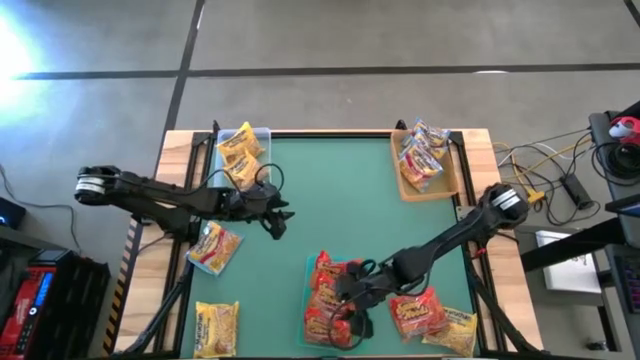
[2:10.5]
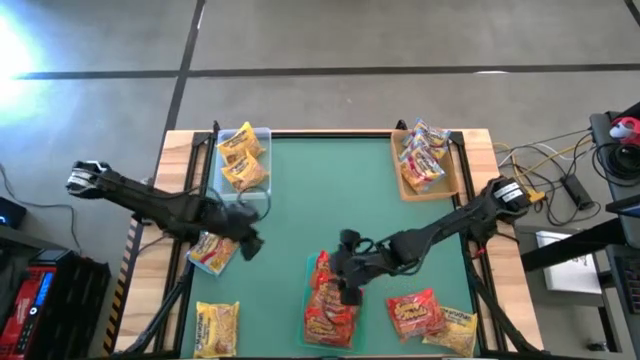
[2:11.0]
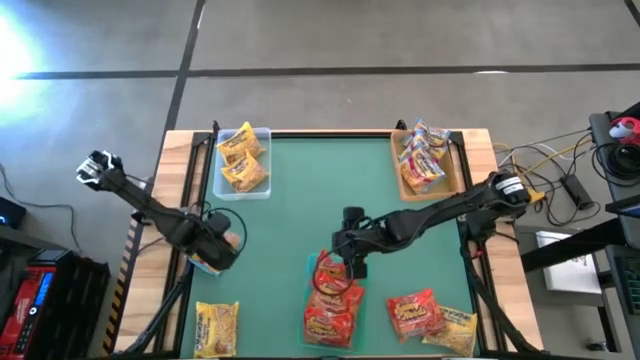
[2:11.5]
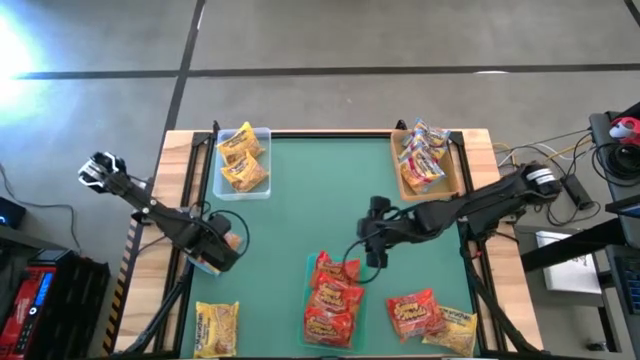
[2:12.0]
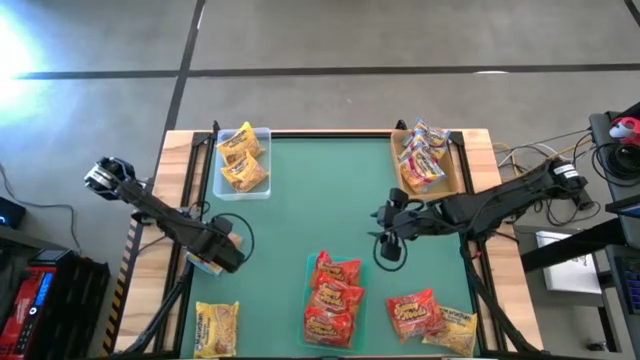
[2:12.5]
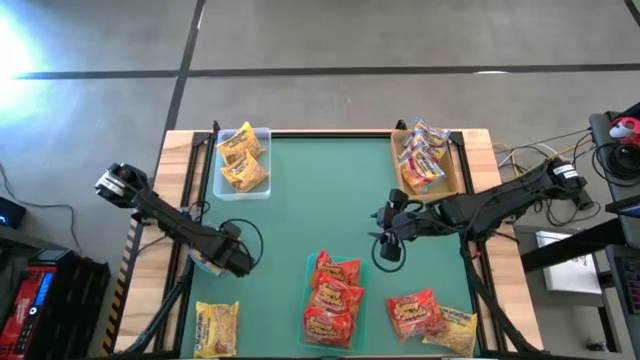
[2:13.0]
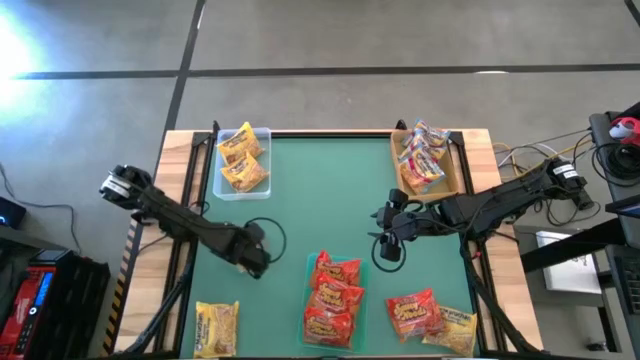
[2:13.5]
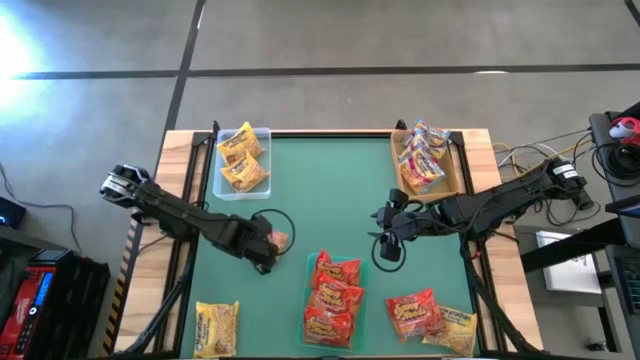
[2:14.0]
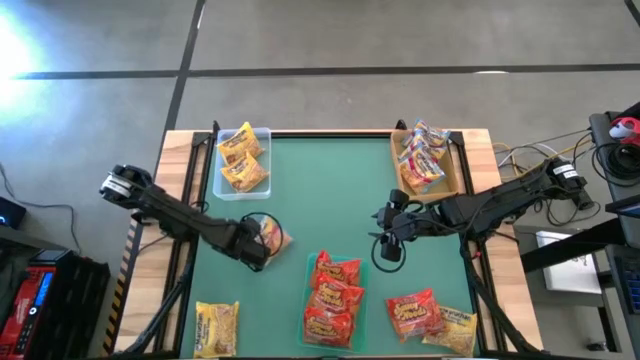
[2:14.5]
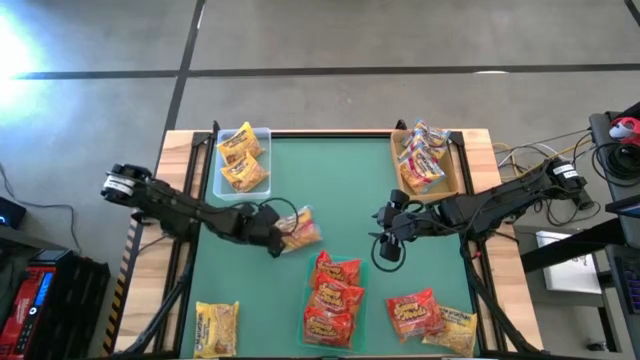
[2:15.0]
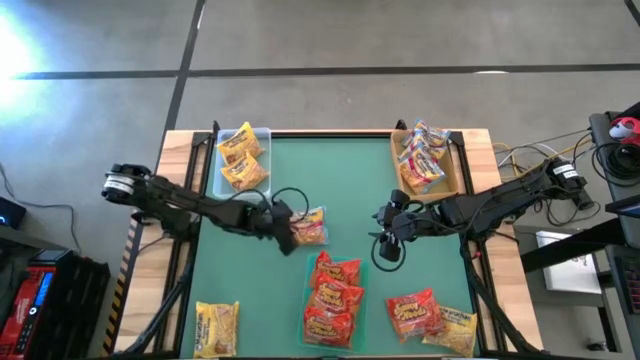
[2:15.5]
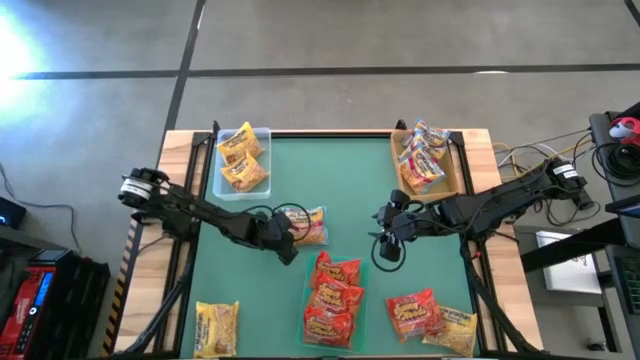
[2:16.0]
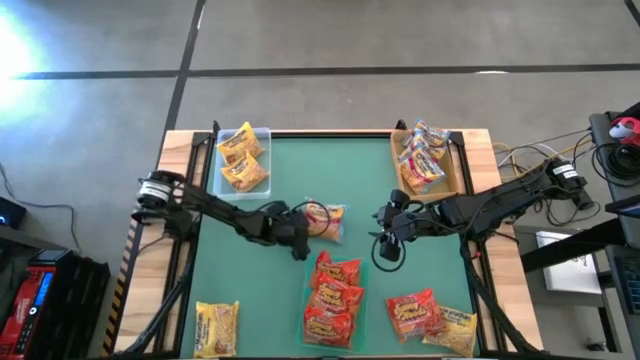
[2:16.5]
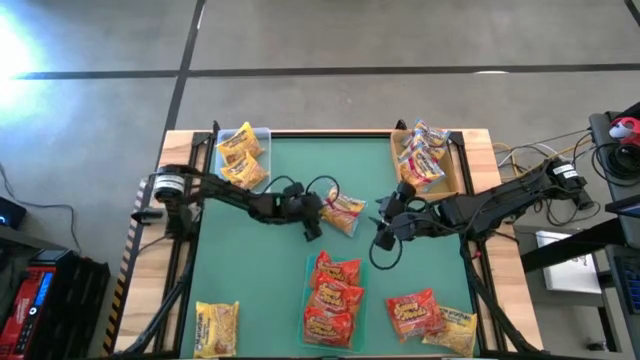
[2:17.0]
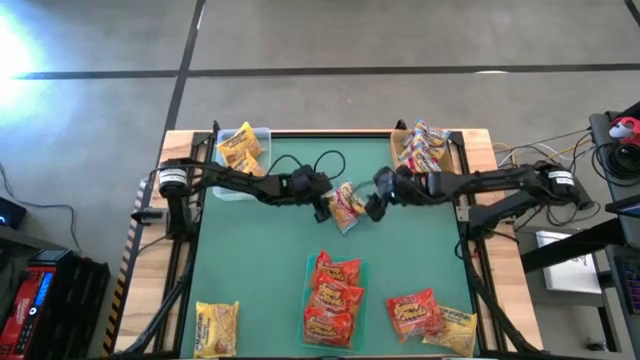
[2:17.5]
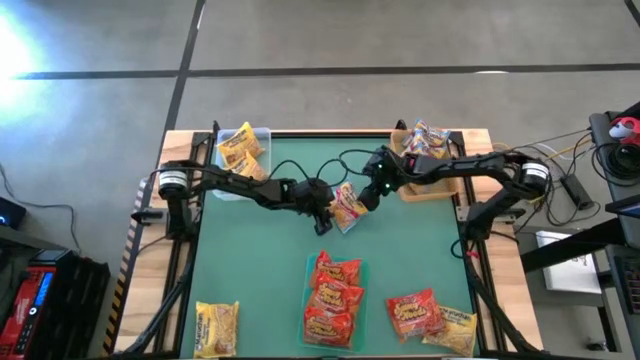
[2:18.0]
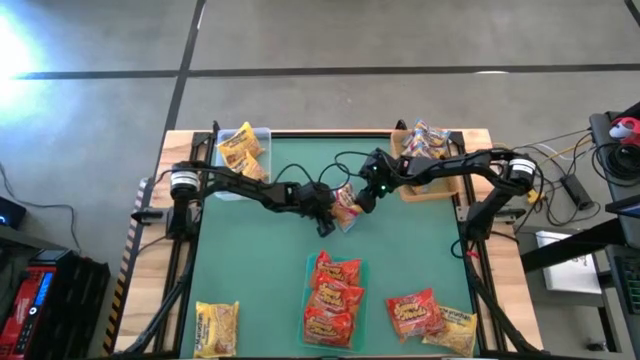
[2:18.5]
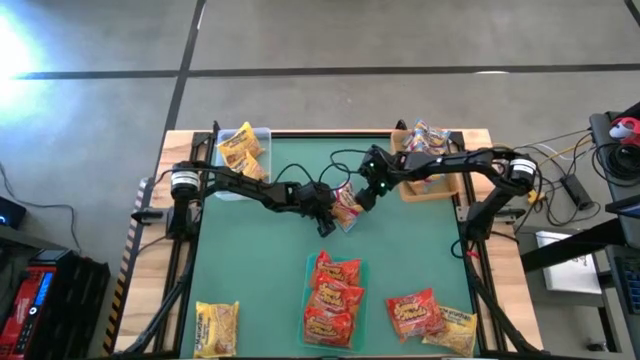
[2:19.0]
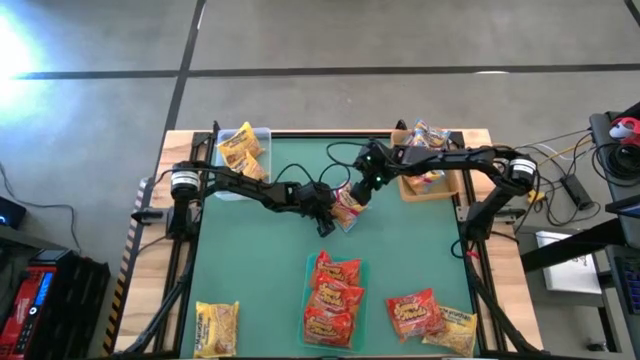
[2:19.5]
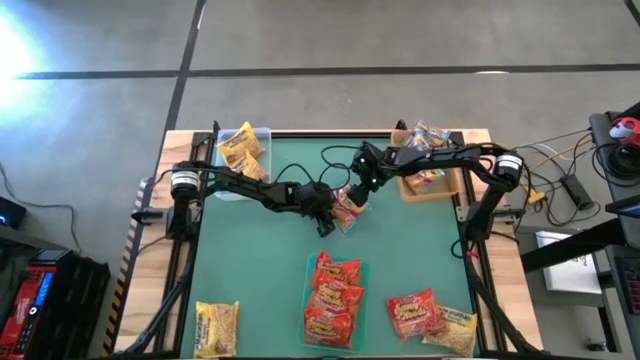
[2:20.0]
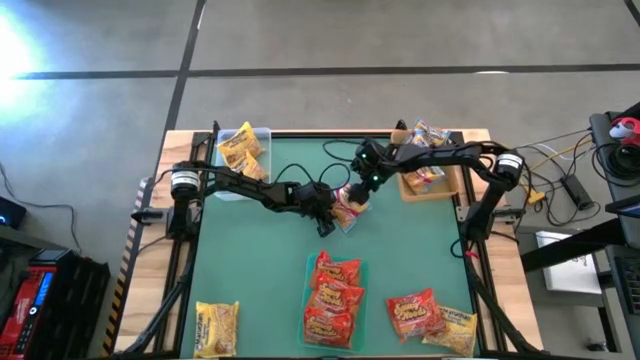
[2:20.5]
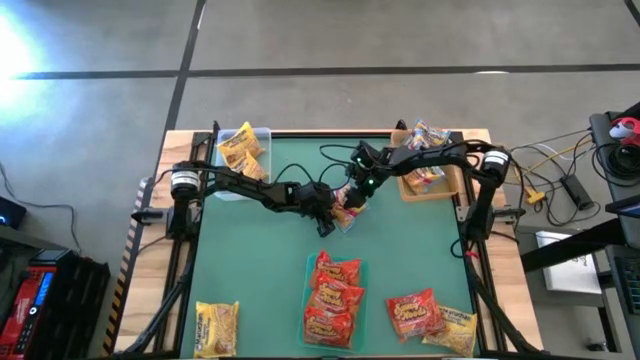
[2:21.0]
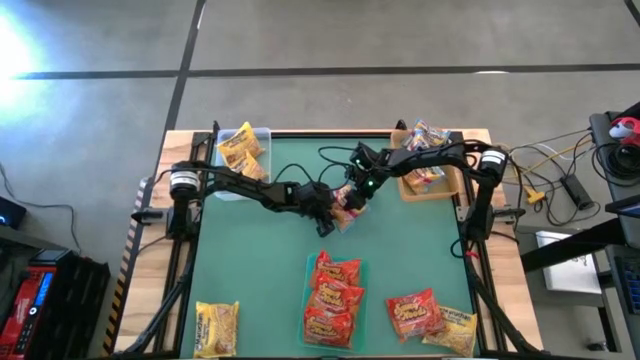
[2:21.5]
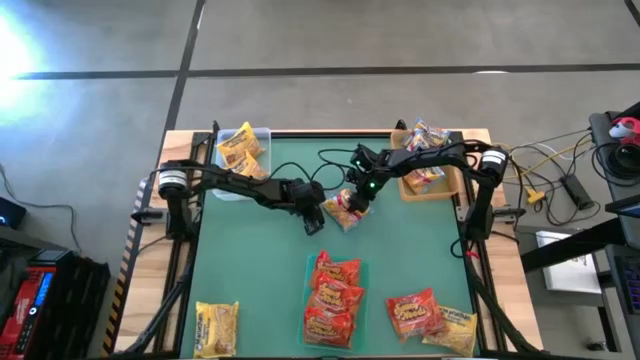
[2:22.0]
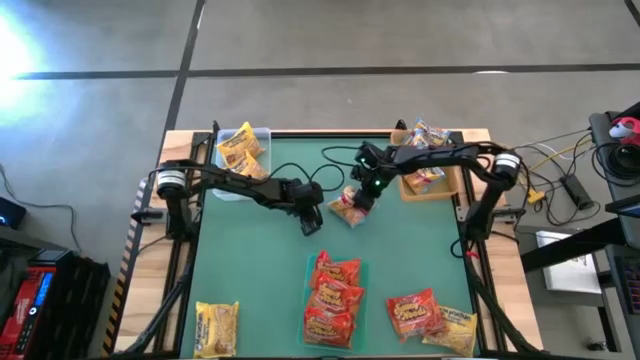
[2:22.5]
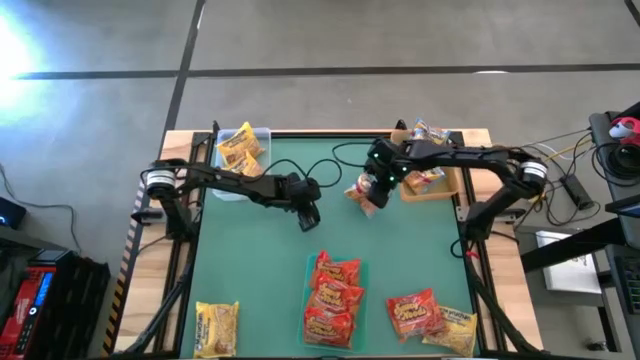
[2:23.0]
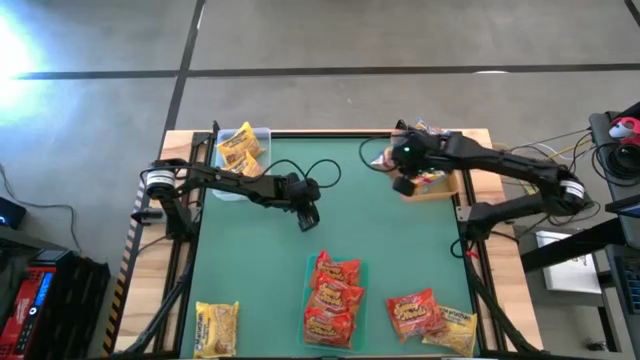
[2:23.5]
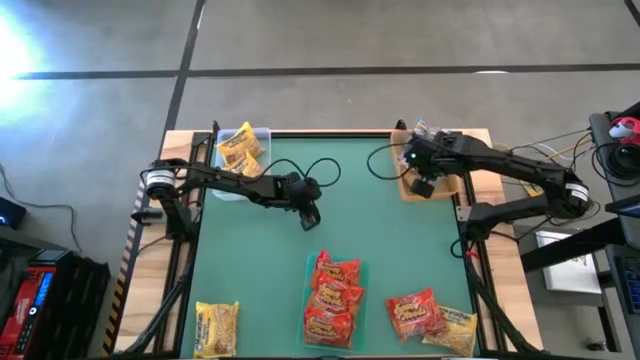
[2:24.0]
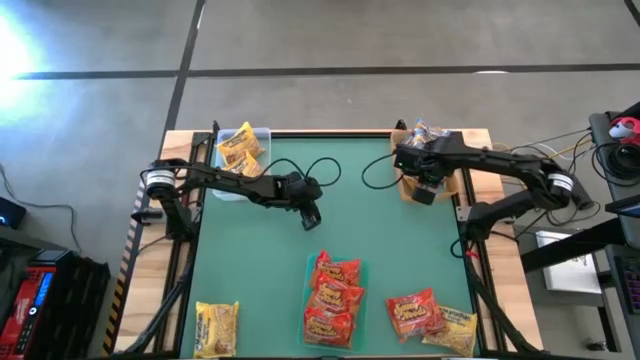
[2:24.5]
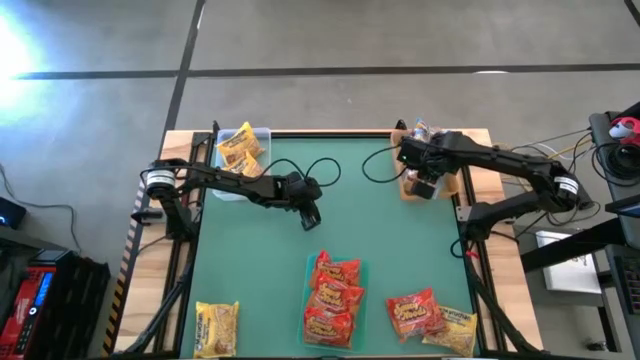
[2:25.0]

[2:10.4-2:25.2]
Task: Sort Maruchan noodles
Put the blue noodle pack into the yellow bin

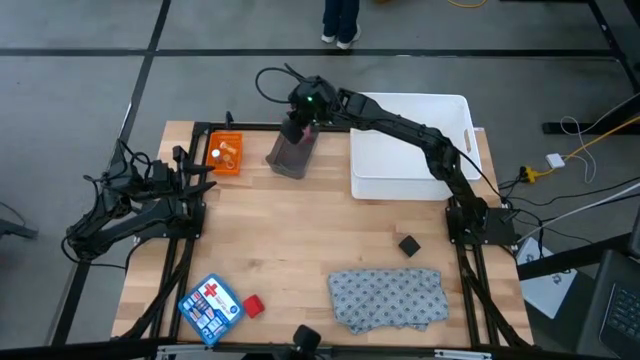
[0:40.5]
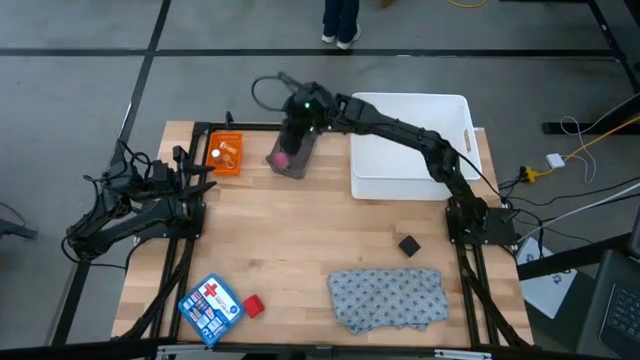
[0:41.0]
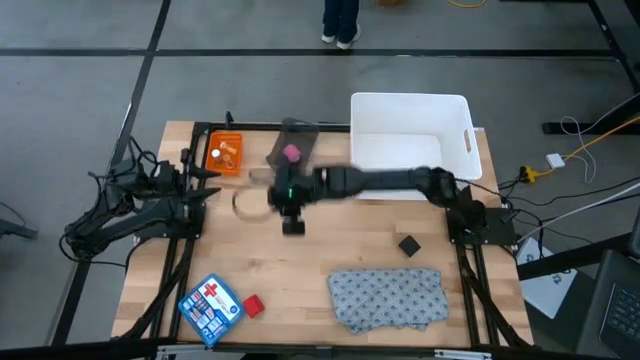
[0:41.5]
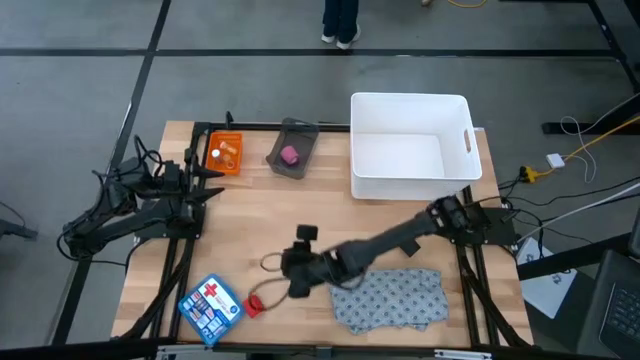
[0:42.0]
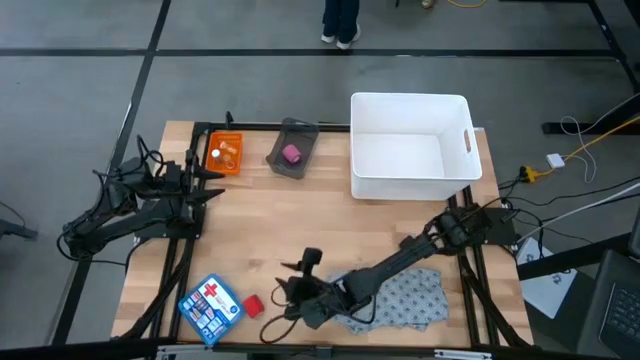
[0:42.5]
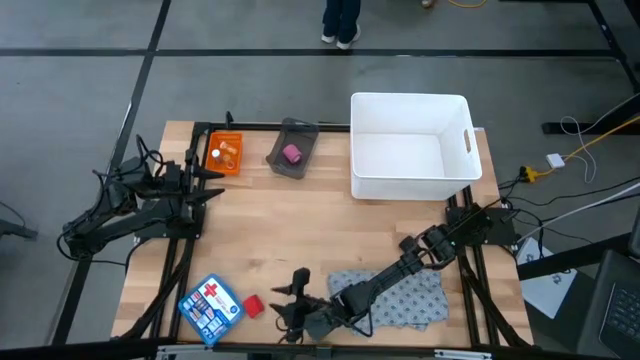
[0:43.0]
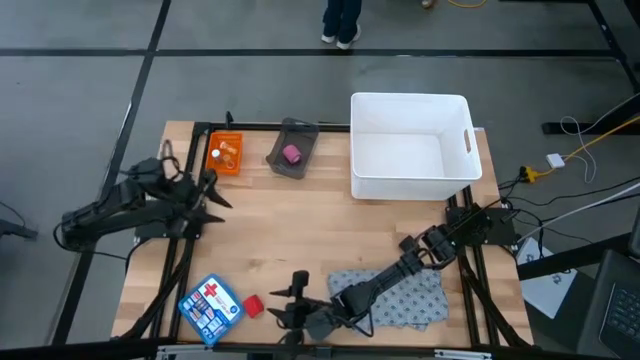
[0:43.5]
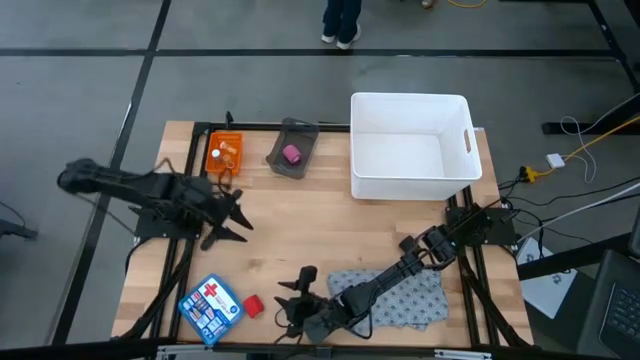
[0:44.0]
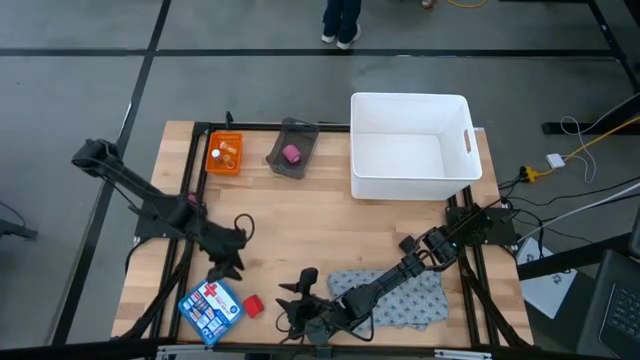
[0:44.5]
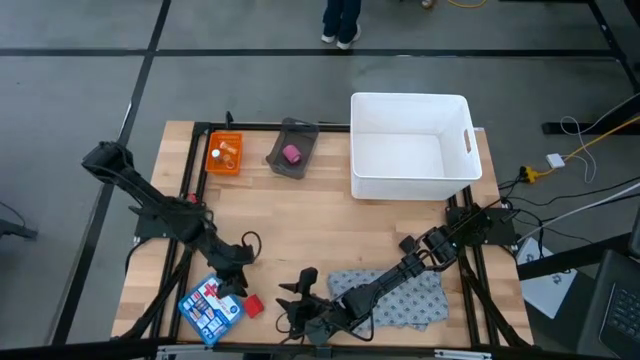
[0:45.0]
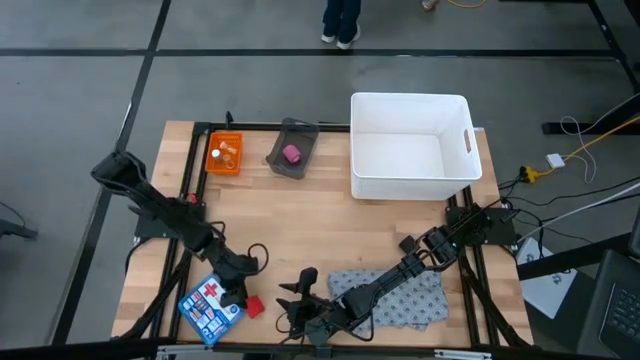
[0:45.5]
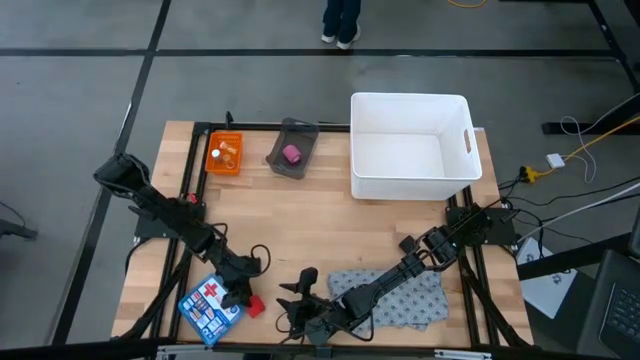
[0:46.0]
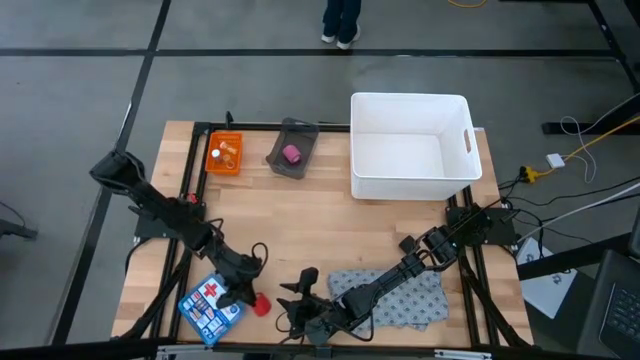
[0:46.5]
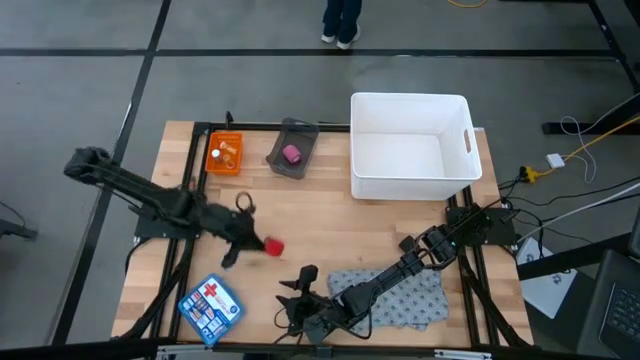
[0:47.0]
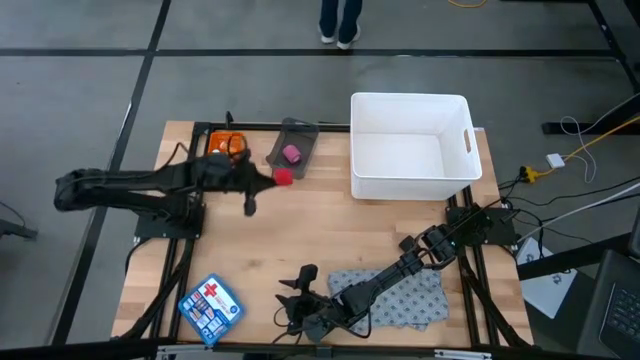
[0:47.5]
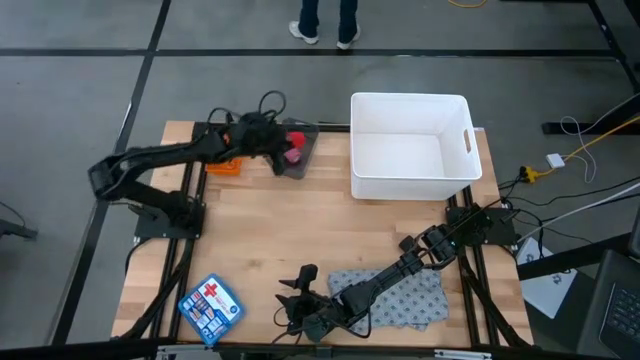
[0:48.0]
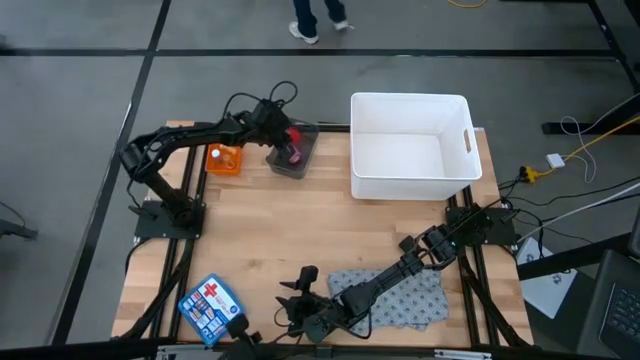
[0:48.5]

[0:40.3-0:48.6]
Task: Pick & place medical supplies in basket/bin
Put the red bandage into the black bin
